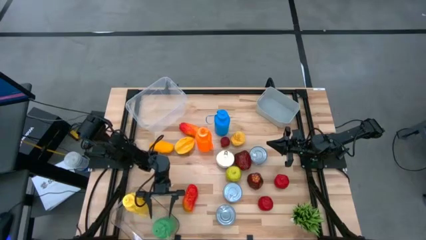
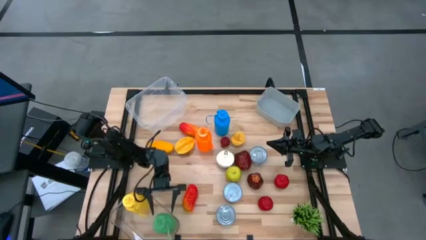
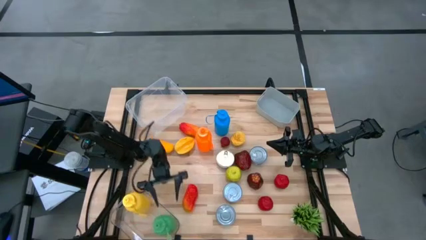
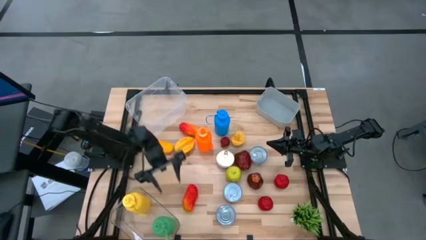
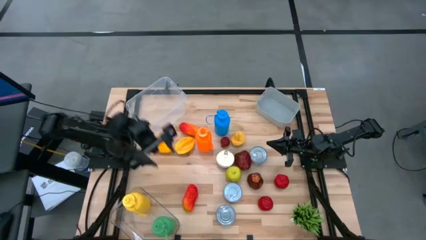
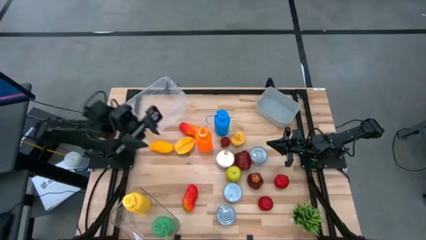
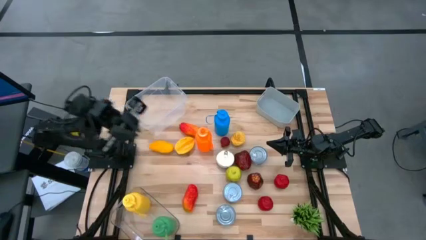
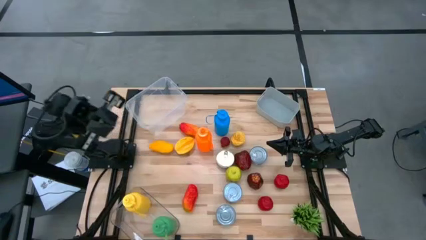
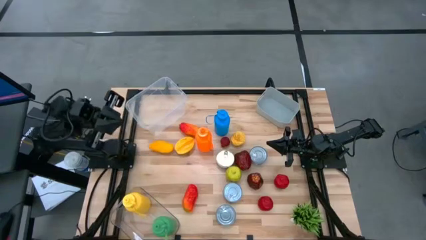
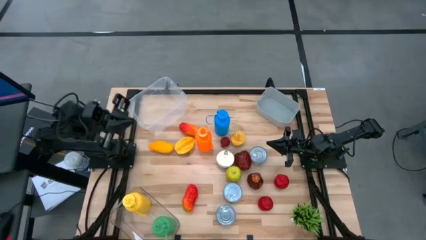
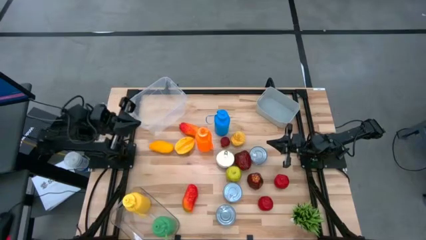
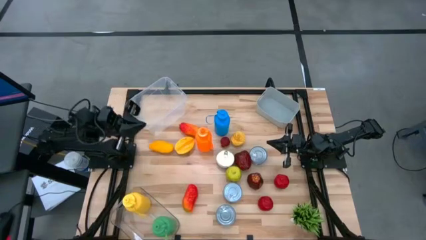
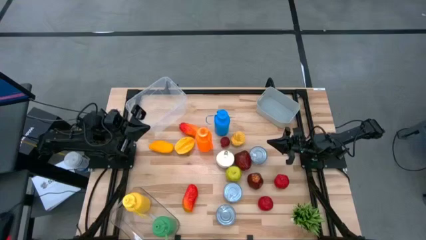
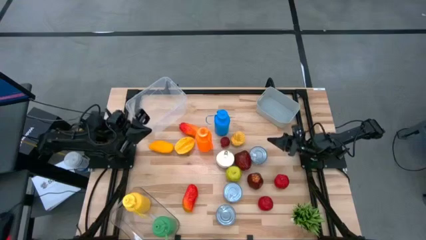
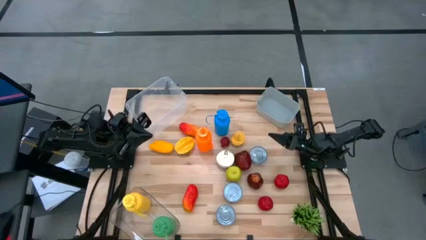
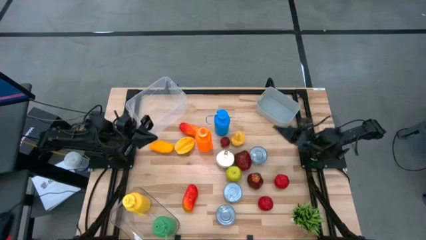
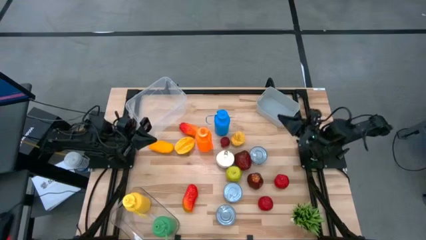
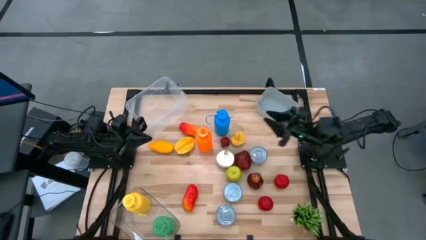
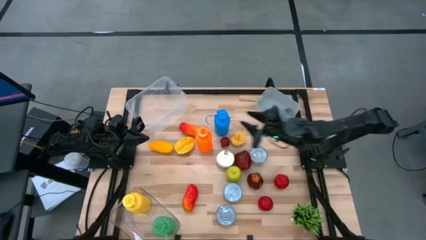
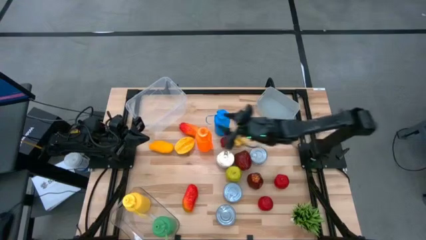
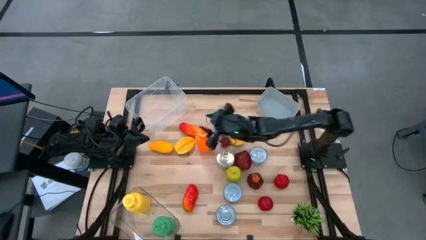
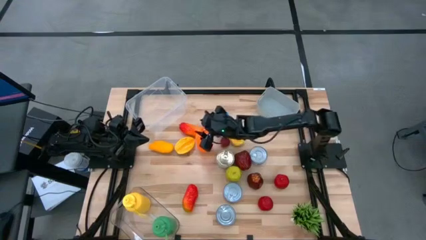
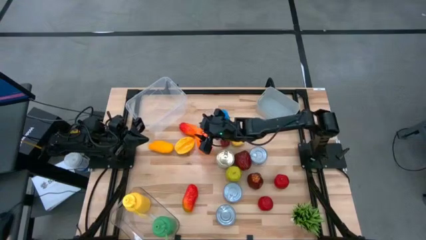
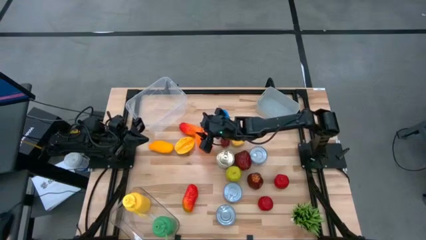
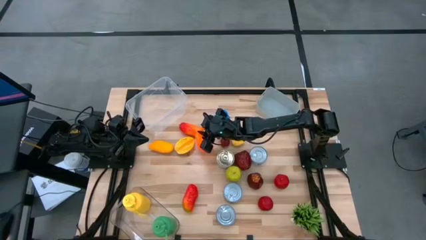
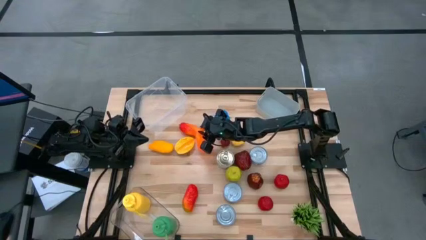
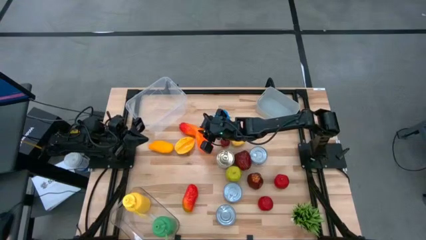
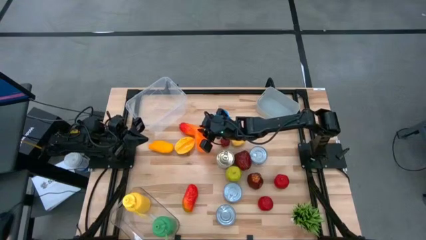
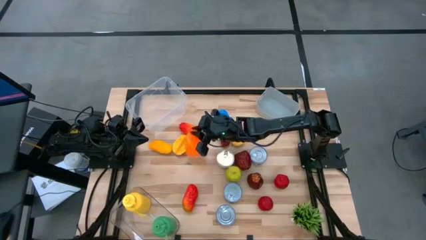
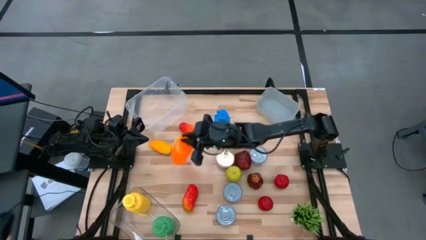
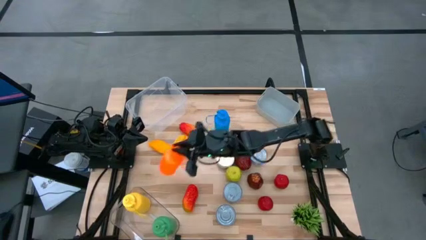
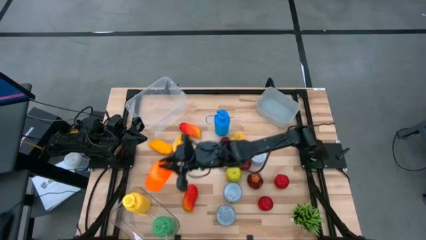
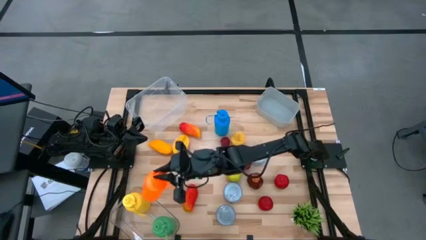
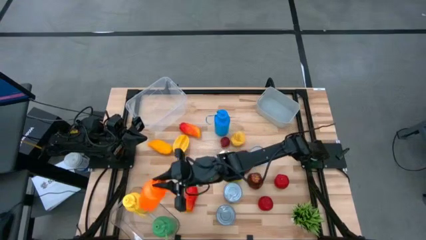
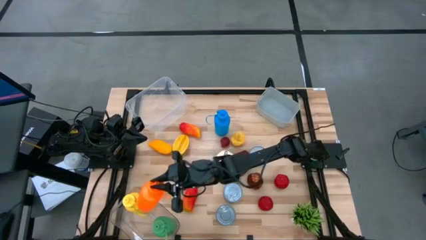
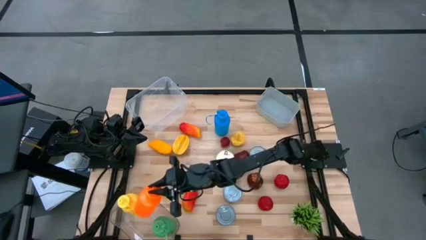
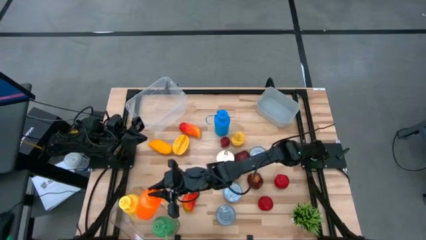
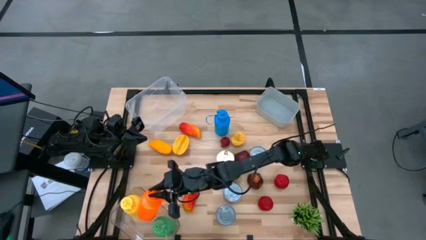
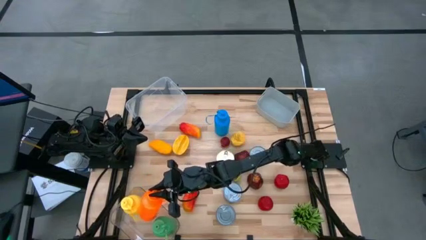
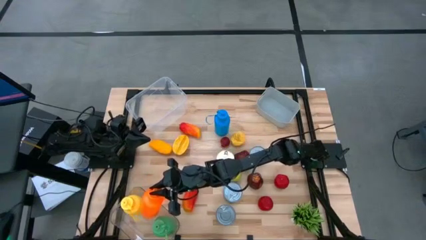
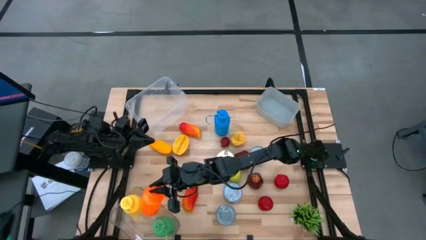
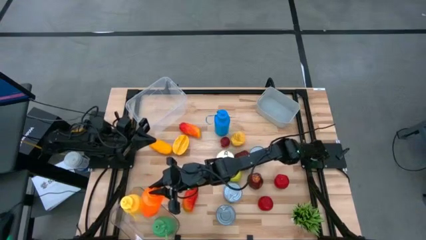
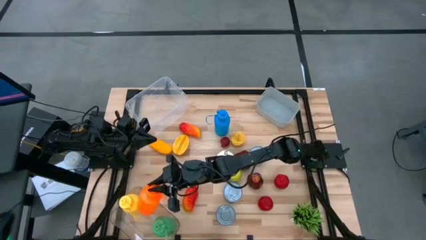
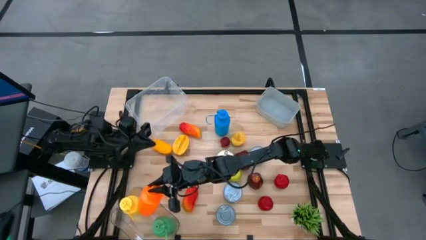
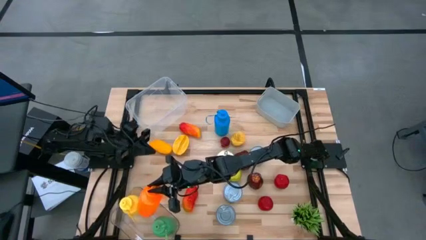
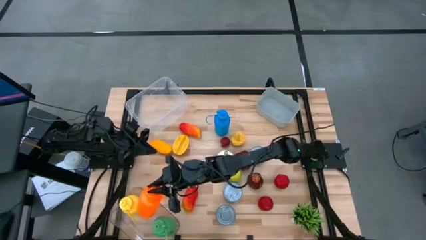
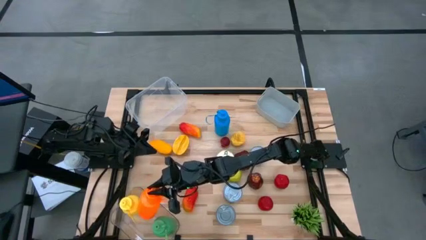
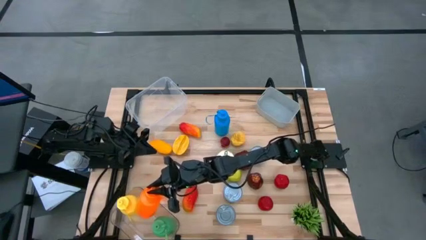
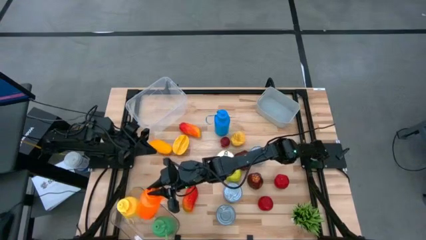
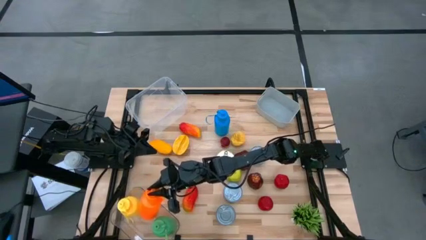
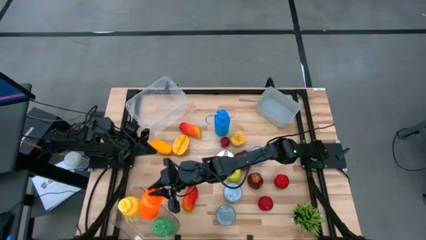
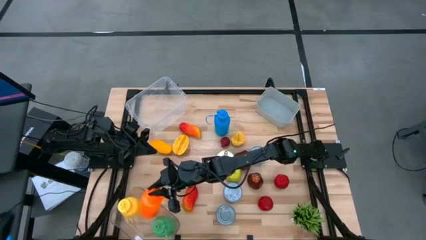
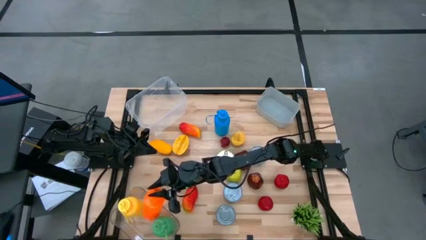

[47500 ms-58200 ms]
Task: Pick & Place Food Item
Put the orange water bottle into the transparent bin

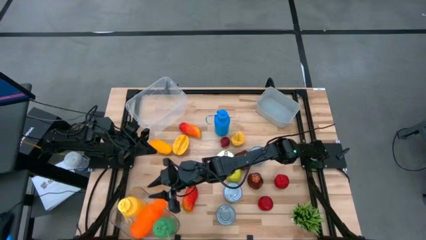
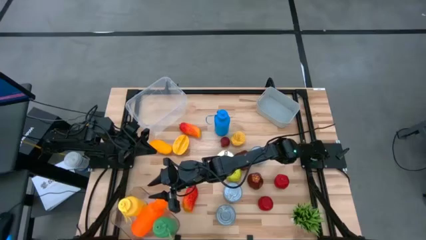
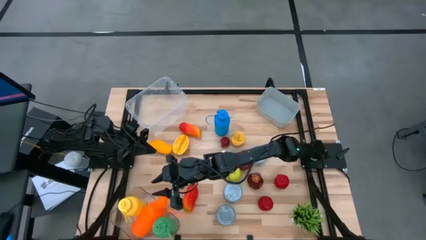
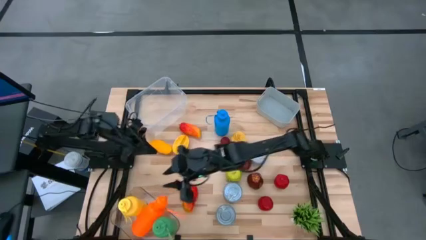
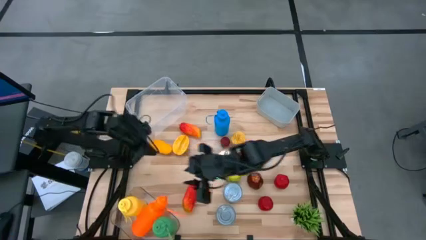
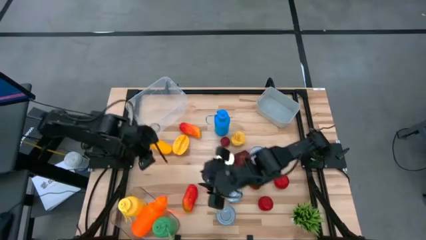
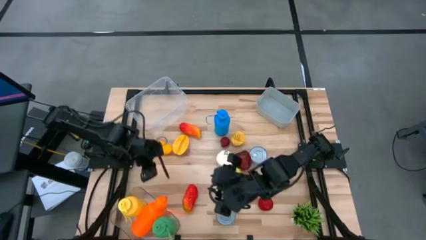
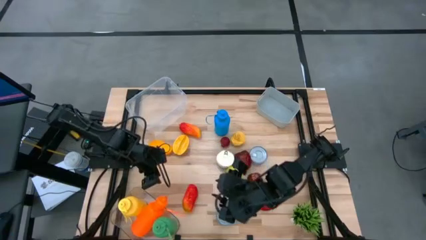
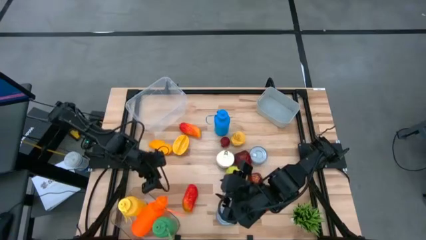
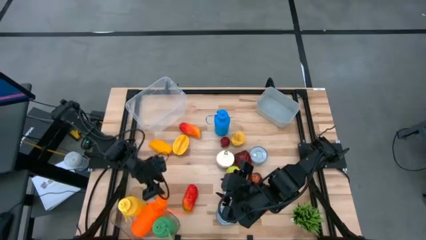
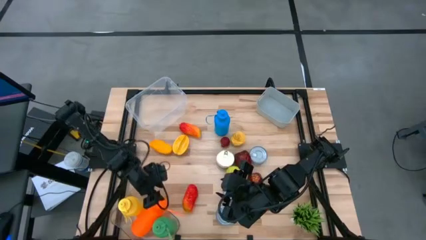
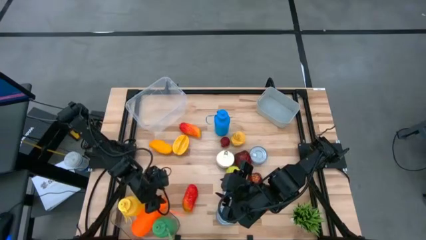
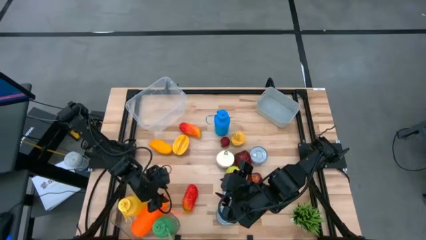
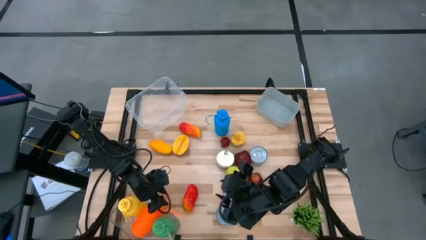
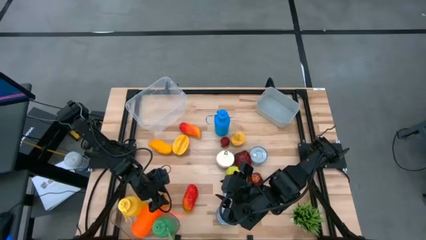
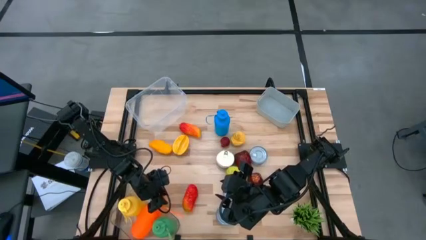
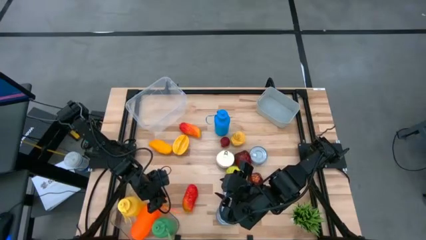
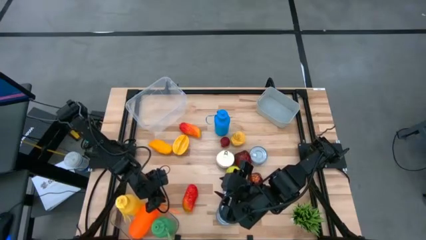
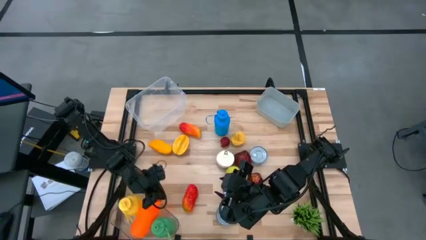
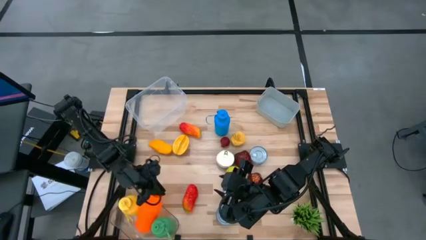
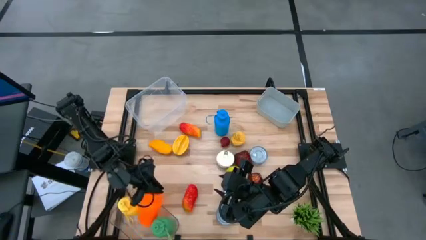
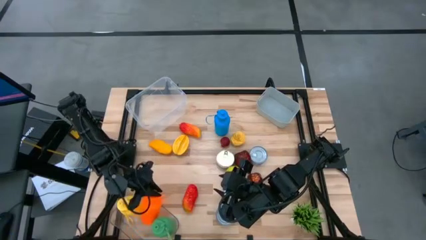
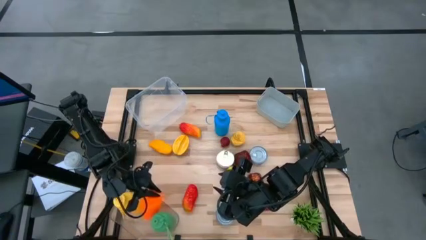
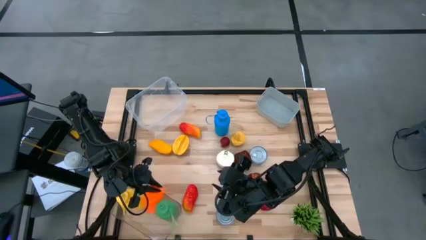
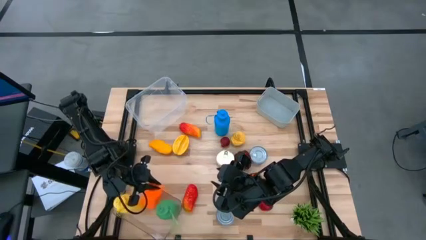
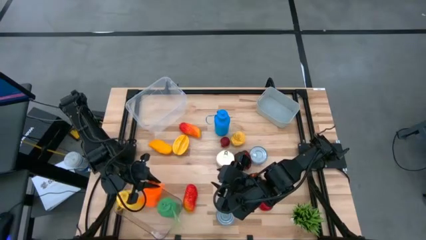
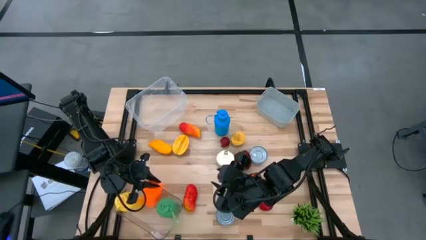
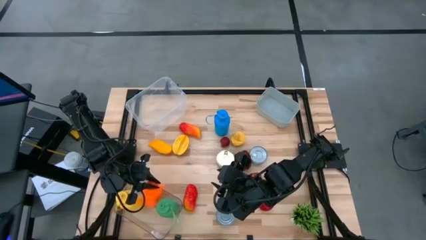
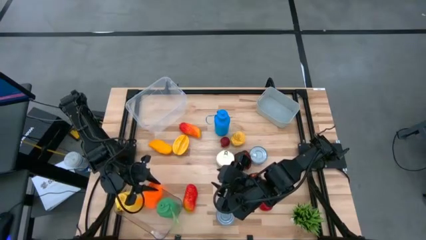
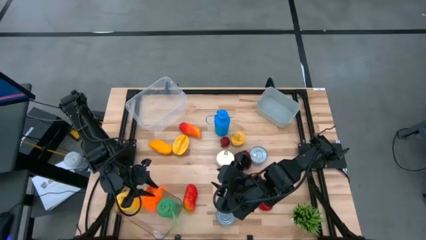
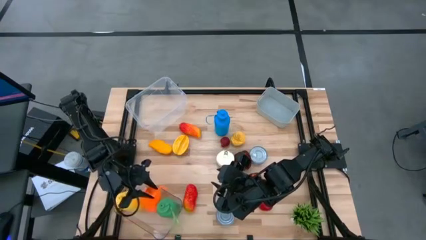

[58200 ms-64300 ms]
Put the orange water bottle into the transparent bin
